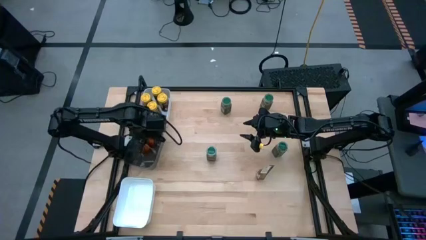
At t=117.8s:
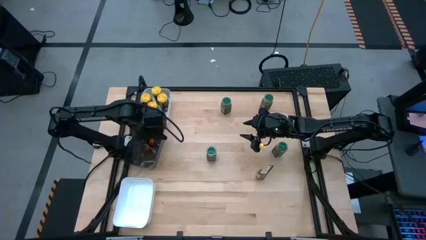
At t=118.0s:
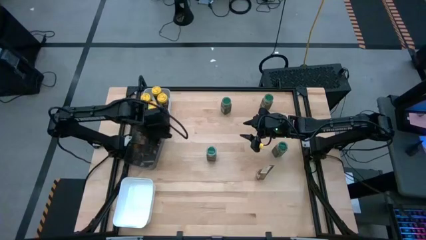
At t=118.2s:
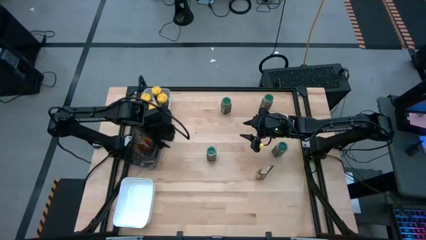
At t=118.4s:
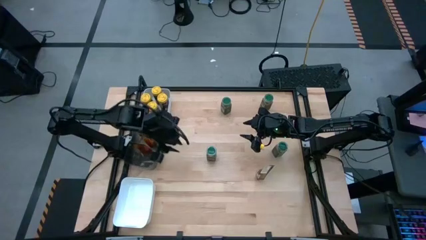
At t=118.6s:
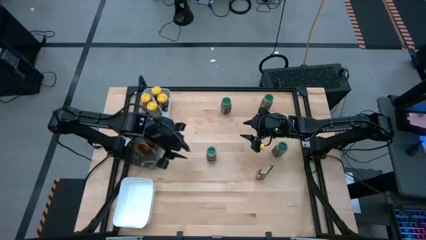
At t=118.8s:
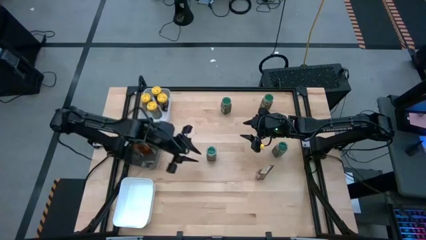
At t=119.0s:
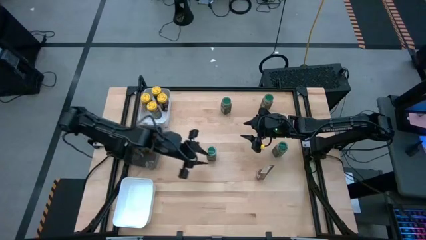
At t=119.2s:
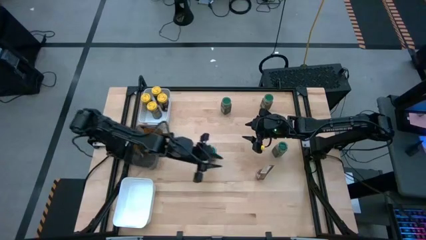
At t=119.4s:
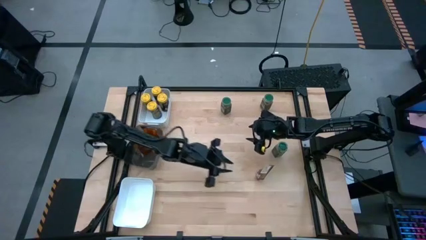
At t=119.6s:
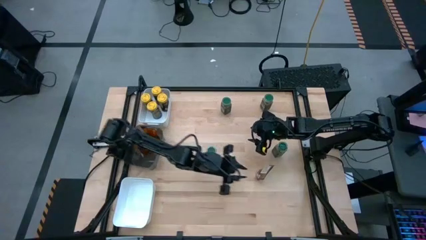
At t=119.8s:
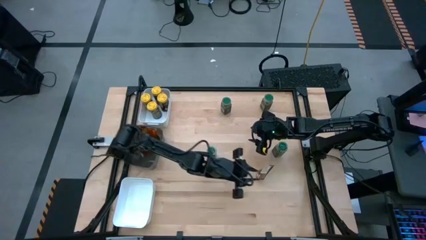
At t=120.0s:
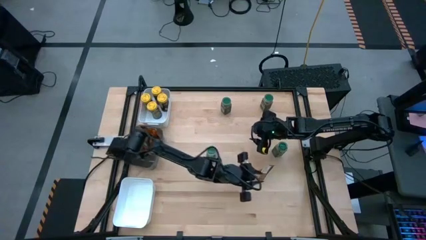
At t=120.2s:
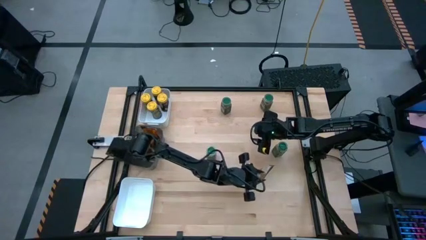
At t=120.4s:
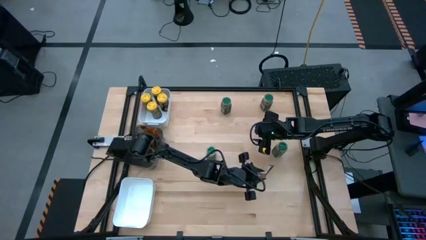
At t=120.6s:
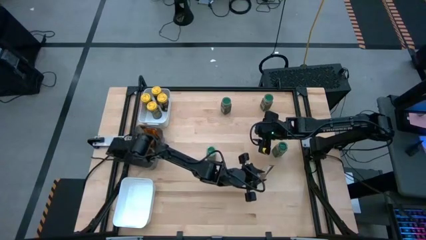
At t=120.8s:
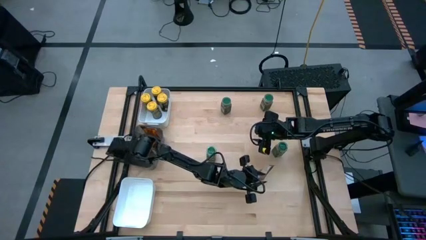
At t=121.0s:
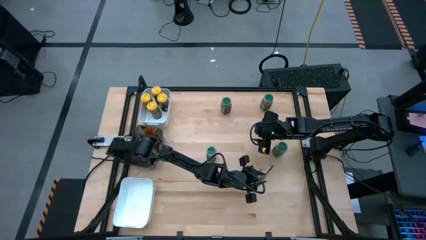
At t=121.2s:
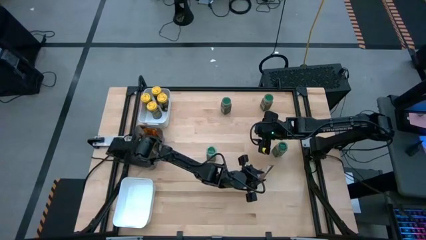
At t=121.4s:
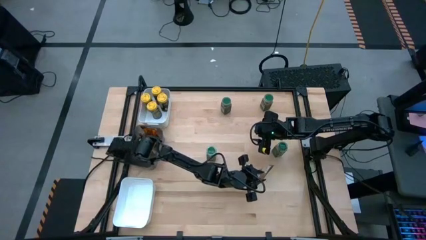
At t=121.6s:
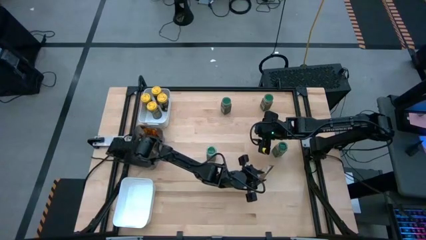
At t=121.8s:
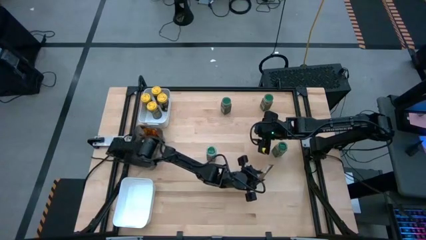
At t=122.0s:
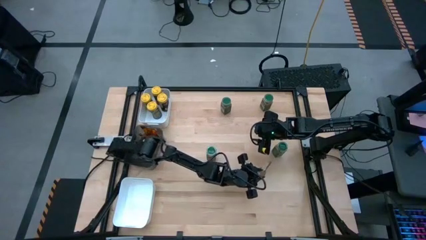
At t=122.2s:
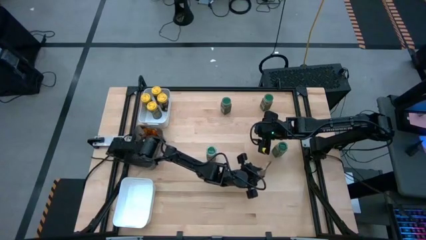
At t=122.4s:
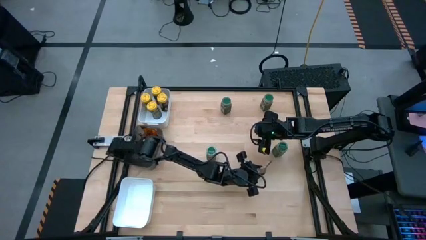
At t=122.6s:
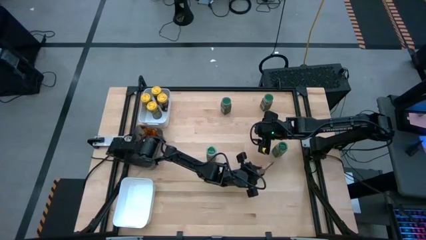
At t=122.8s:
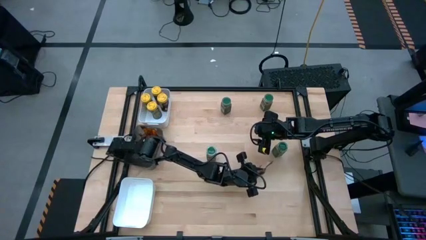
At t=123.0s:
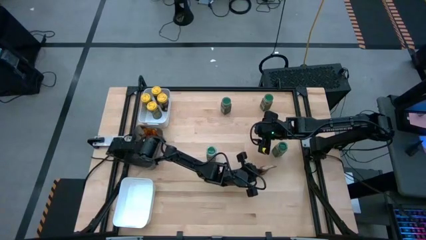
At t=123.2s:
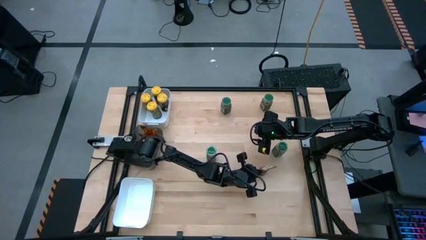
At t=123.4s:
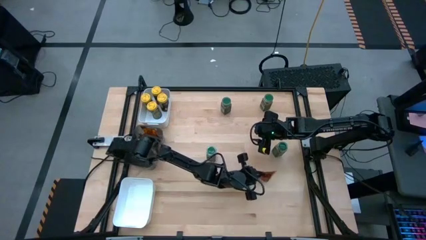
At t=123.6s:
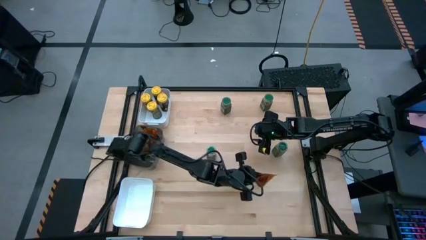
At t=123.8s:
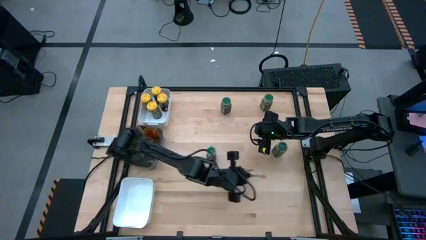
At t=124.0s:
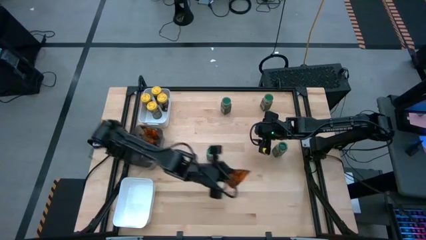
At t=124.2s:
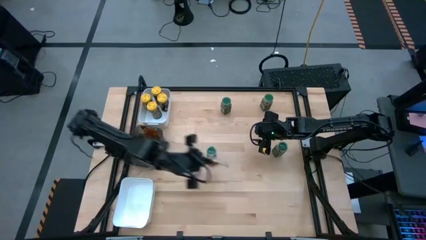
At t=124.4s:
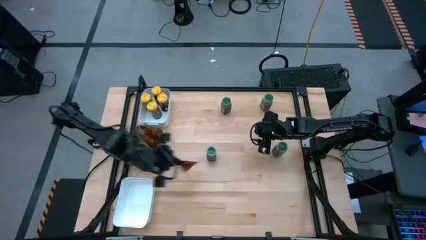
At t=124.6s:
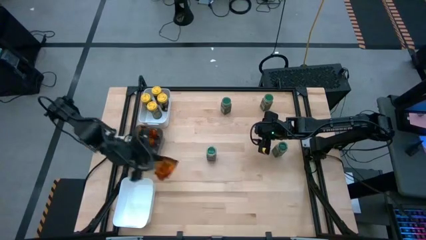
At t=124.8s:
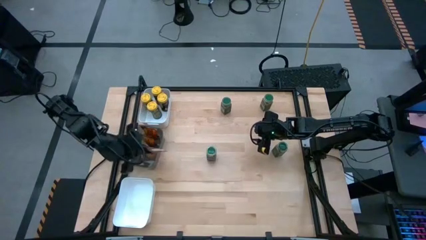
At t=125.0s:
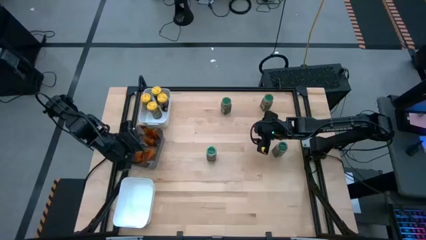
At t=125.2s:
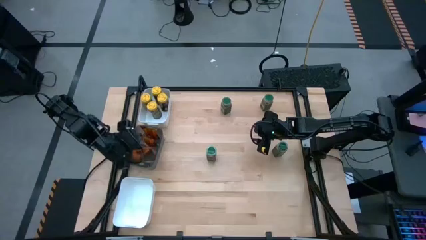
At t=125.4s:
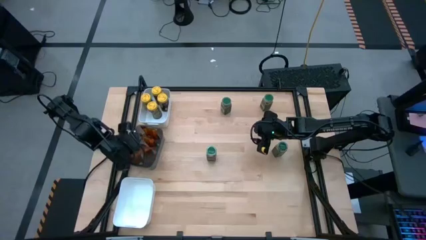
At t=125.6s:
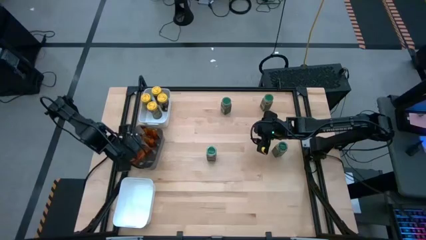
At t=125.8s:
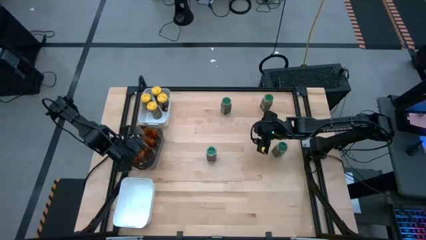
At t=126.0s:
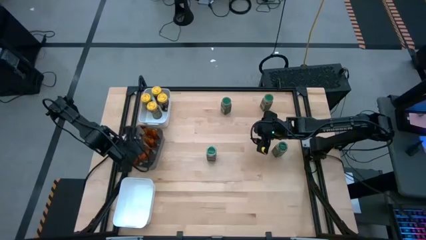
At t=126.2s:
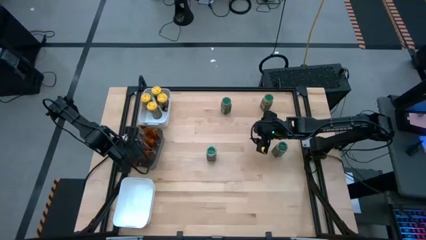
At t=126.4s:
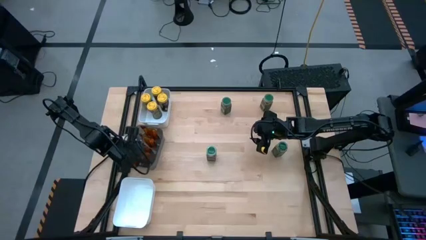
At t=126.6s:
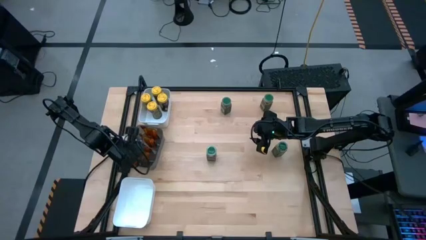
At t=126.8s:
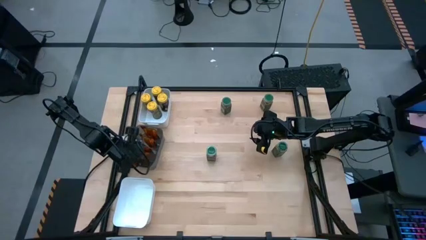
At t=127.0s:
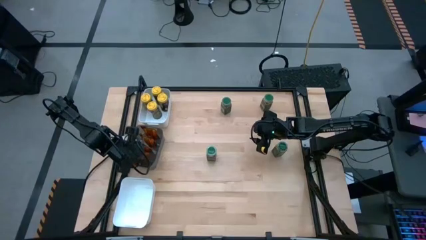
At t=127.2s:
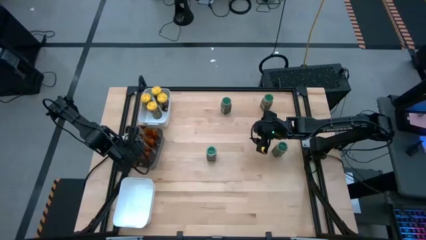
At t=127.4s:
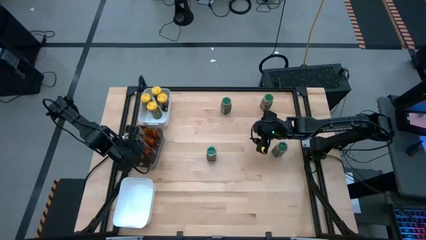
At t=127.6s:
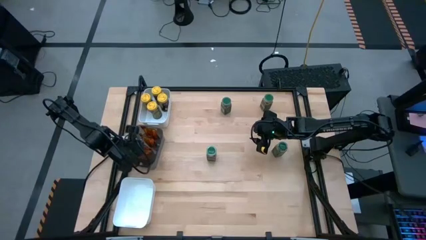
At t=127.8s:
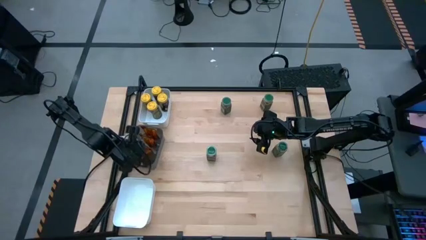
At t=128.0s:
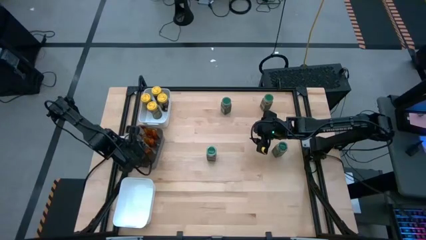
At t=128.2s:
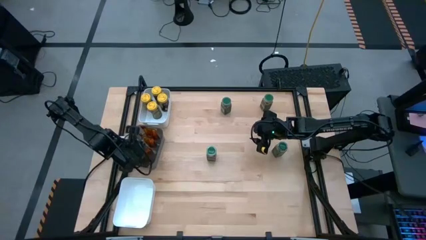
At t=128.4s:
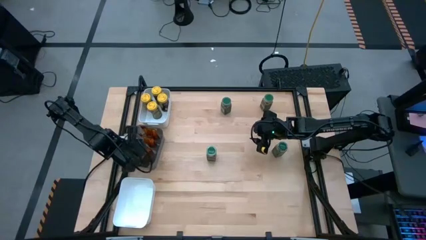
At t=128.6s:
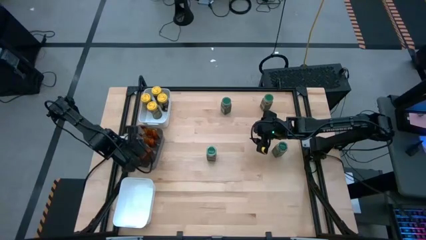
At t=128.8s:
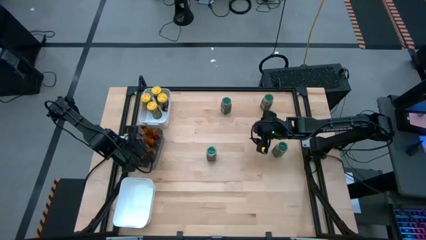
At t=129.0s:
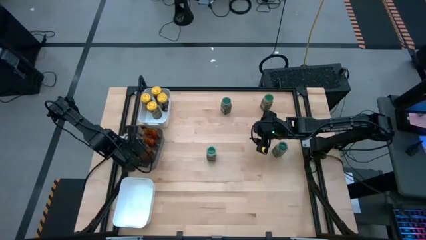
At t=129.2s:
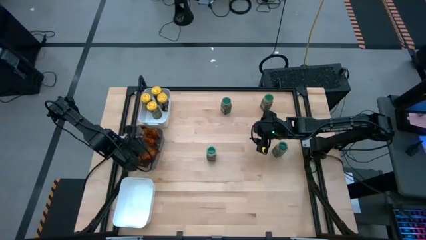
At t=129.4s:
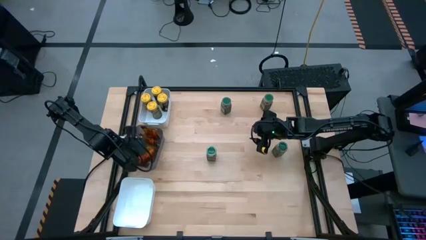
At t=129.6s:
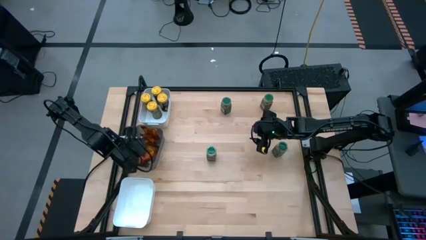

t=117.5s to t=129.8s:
Task: Sort spices by type
Put the orange seasoning pack into the black bin
